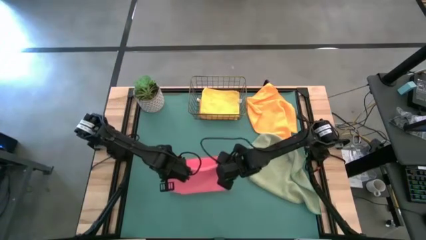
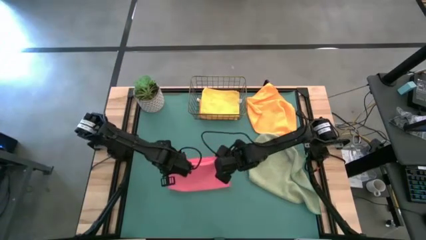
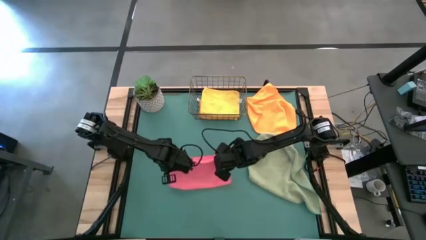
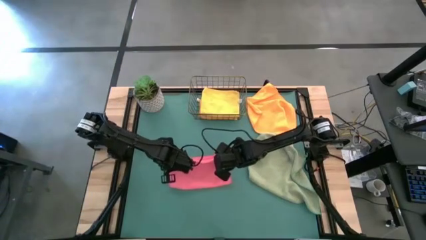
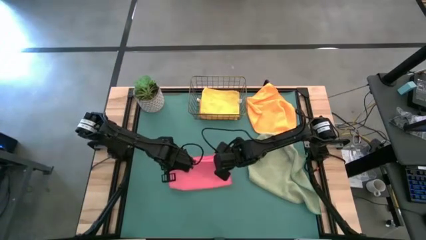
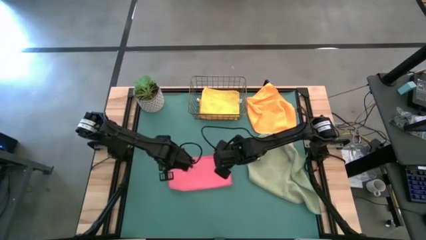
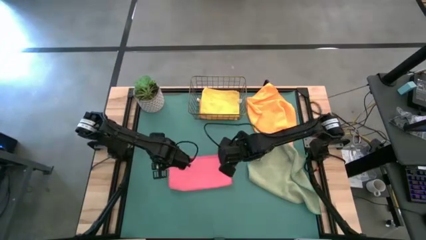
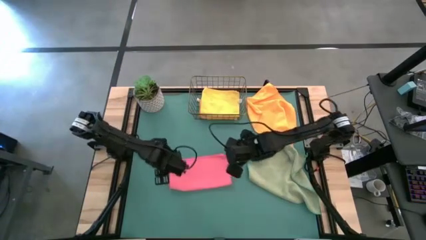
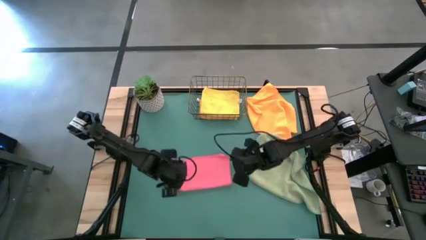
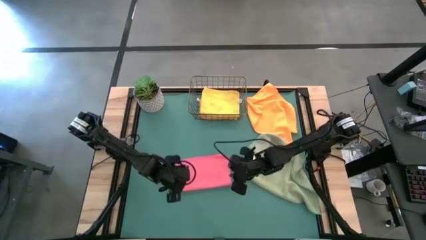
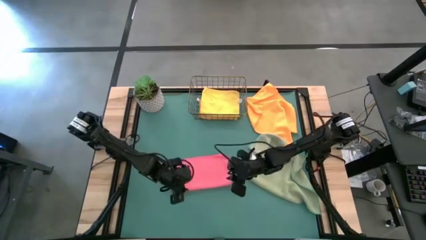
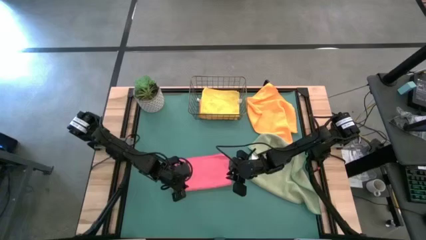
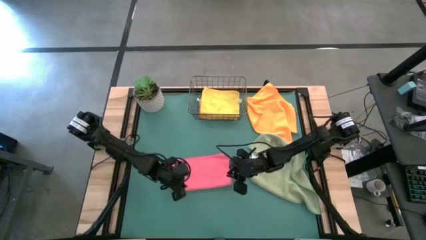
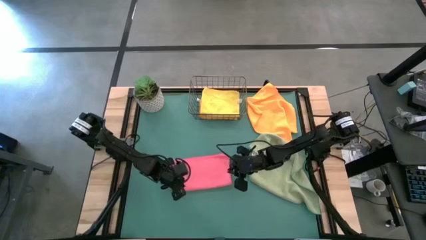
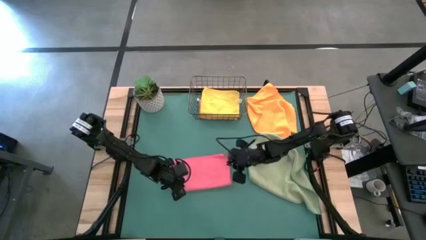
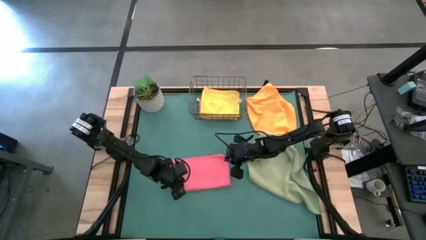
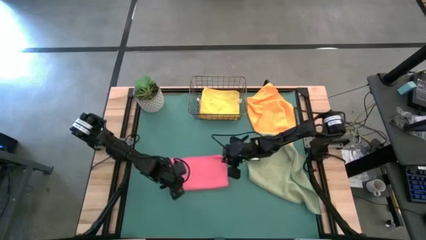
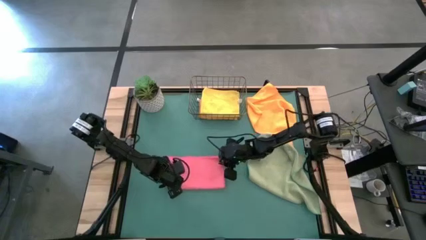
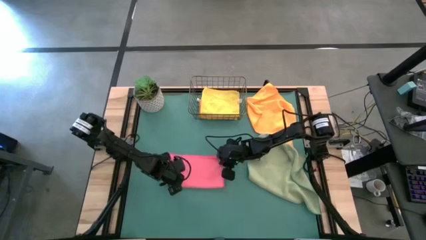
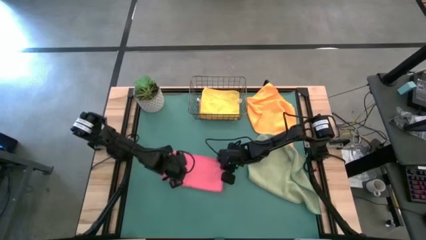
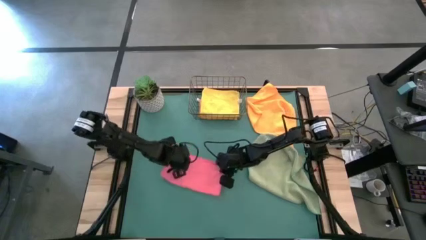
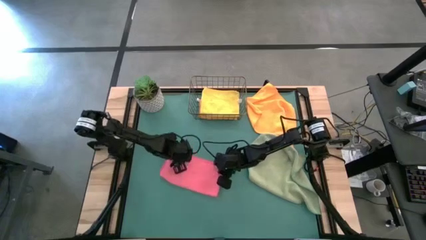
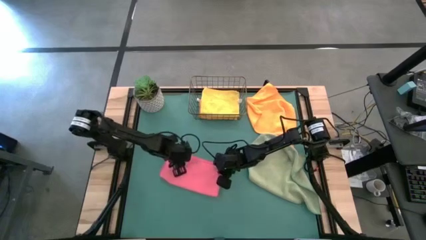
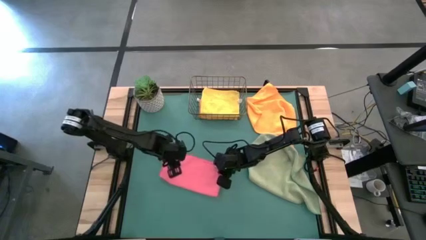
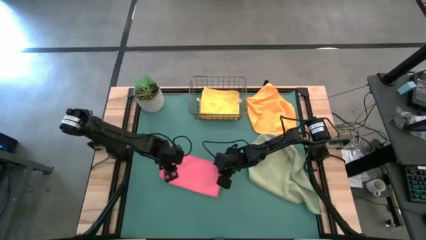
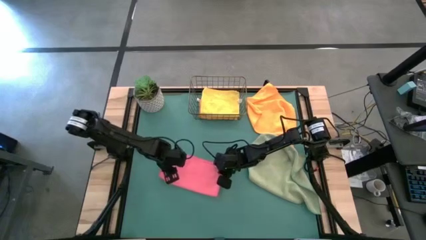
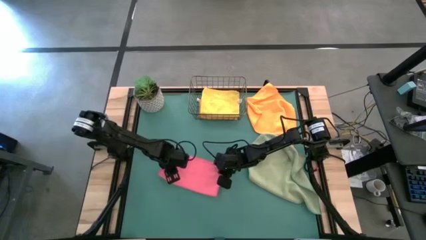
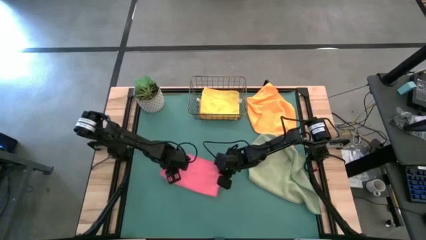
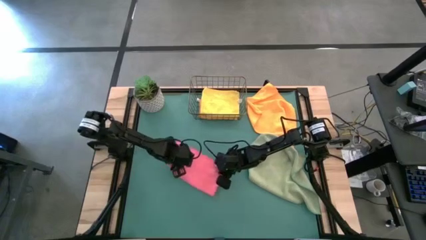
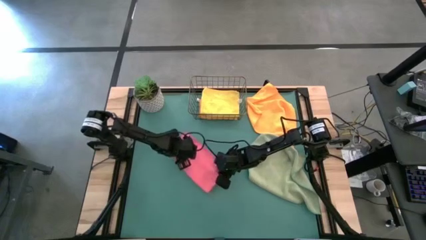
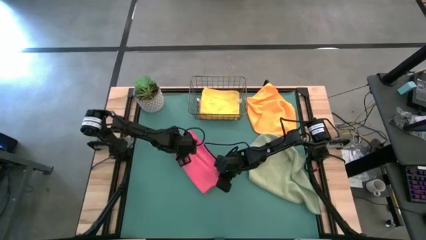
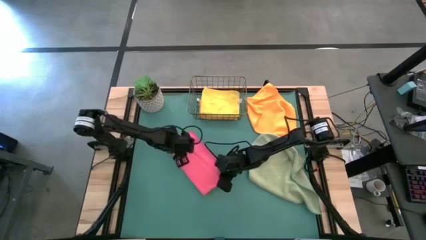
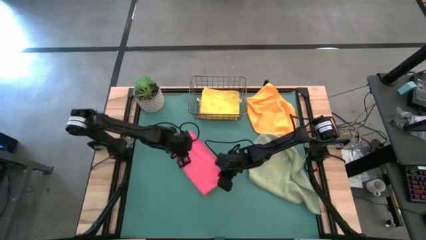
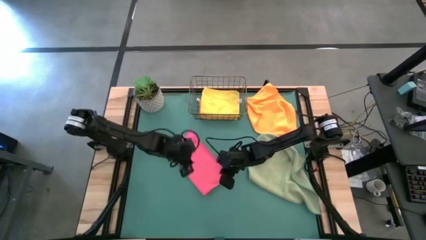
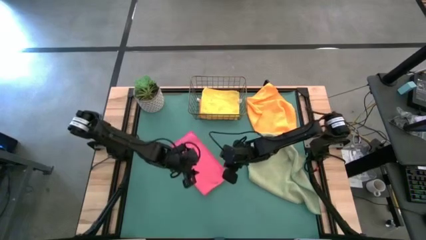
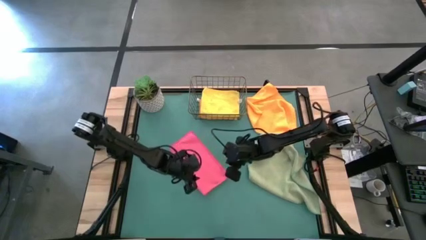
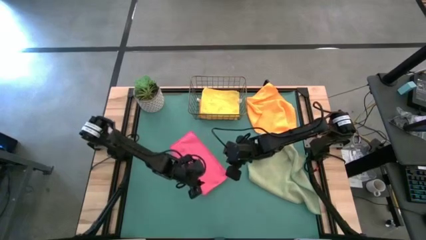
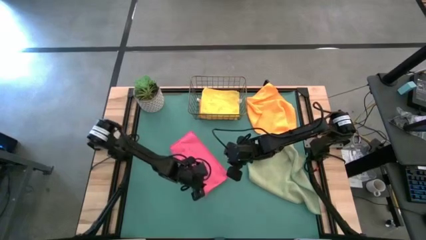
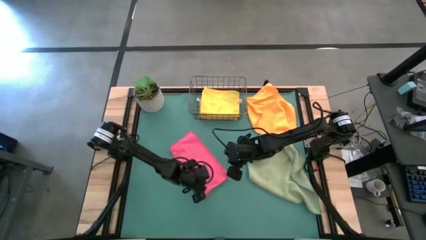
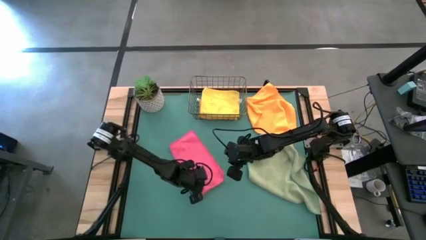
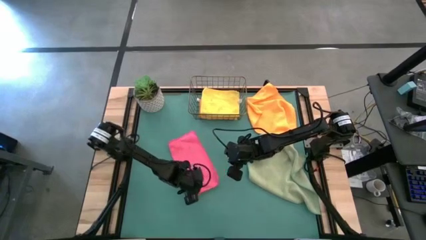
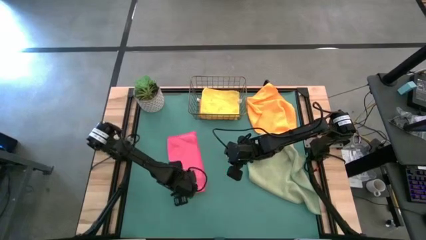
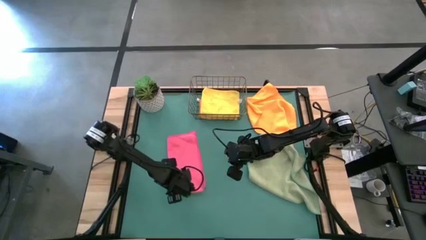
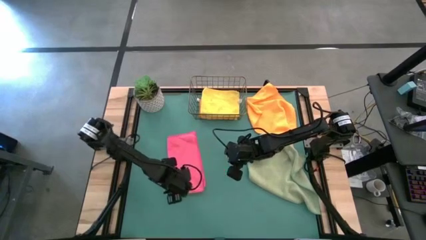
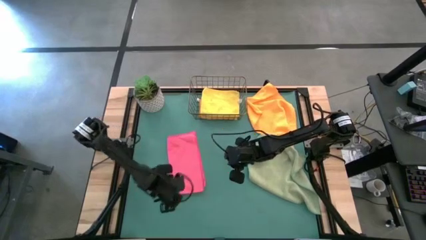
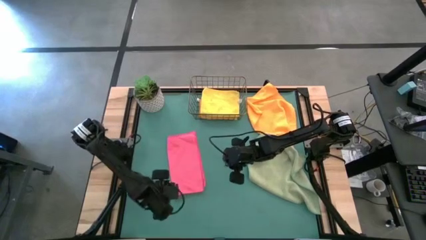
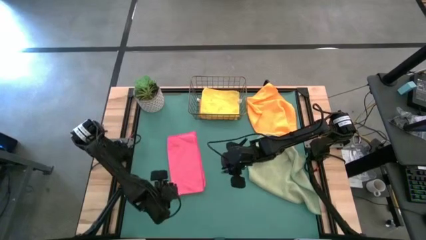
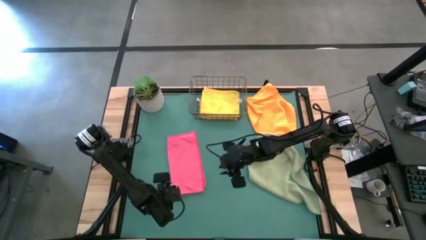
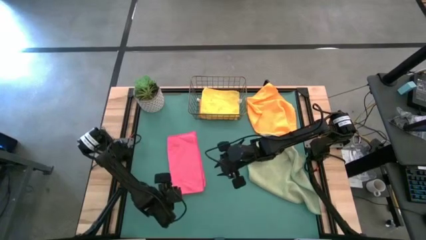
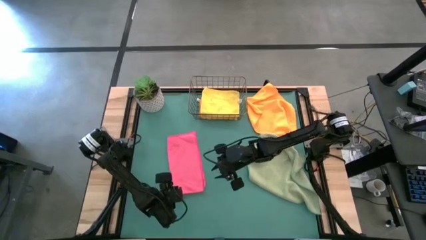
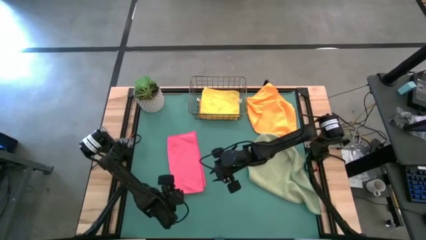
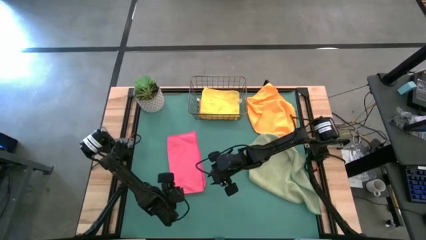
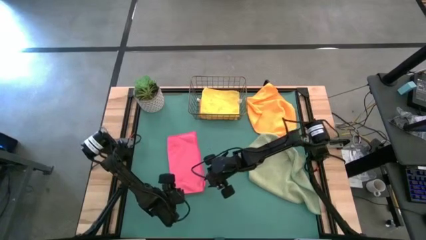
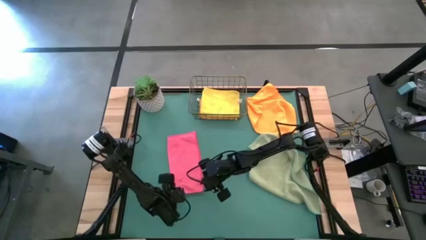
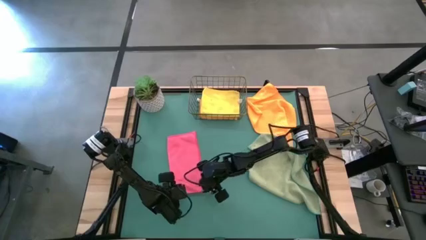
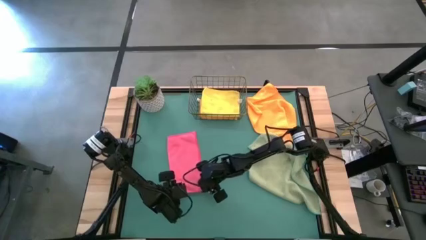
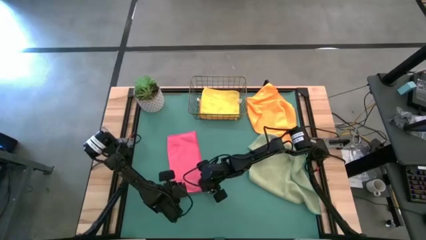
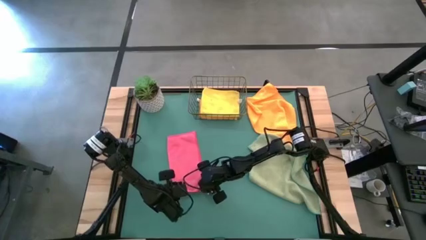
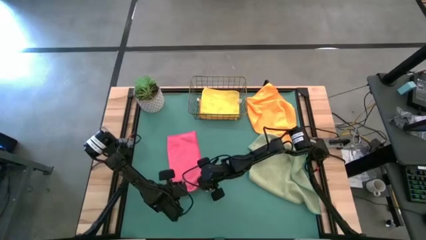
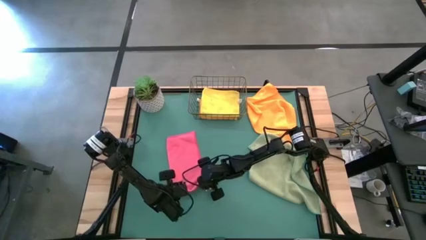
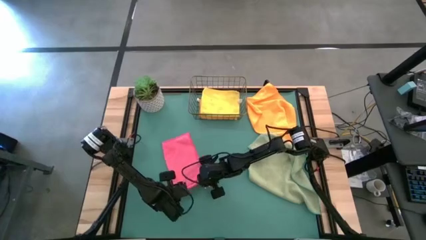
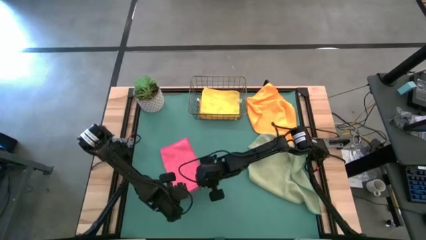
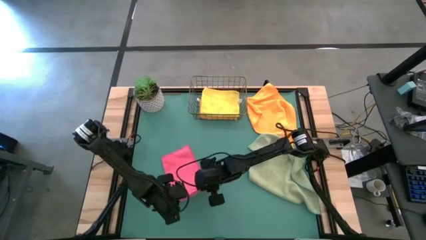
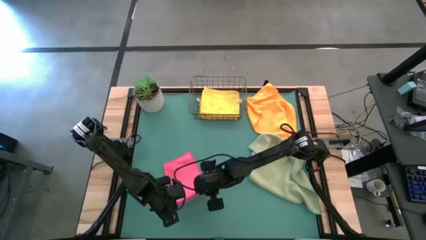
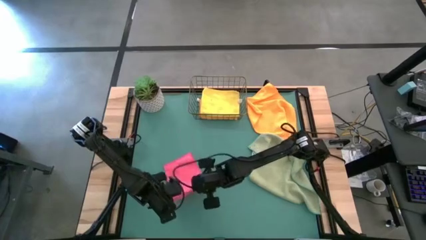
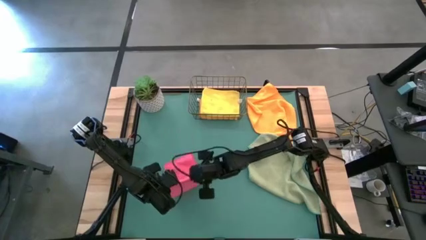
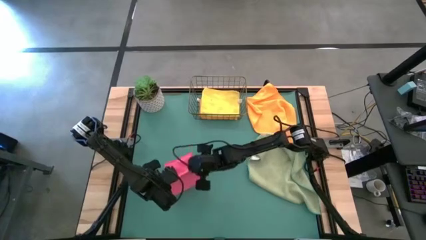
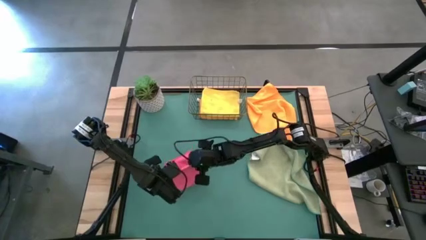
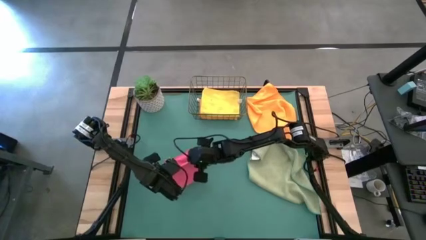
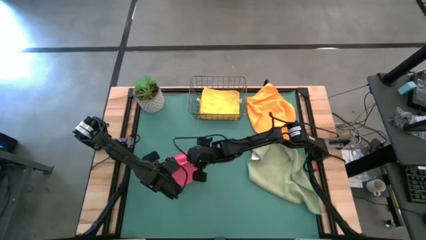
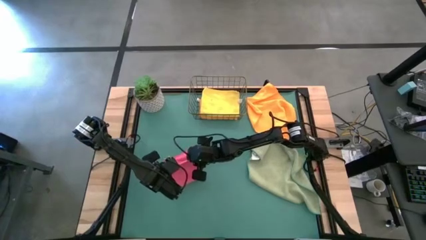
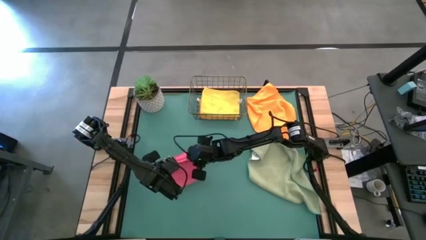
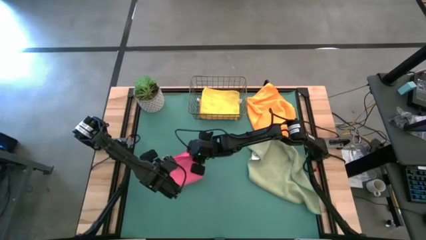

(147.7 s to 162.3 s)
Task: Fold microfiber towels
Fold the pink microfiber cloth
